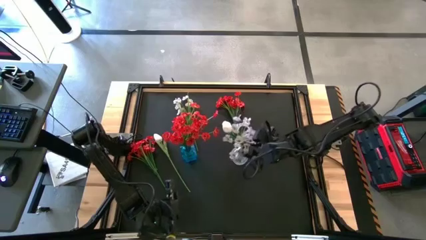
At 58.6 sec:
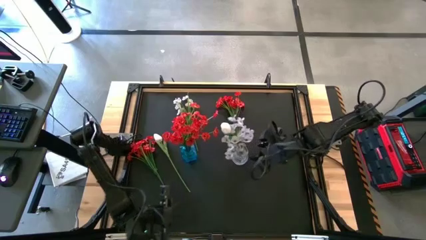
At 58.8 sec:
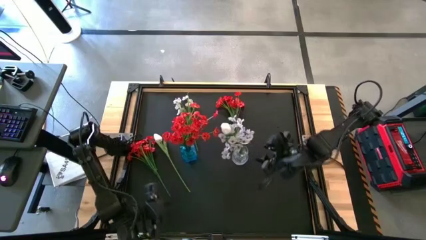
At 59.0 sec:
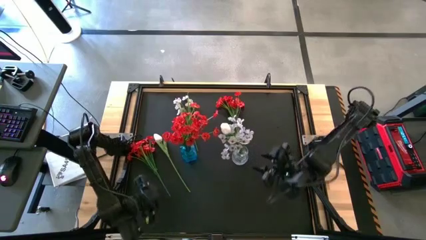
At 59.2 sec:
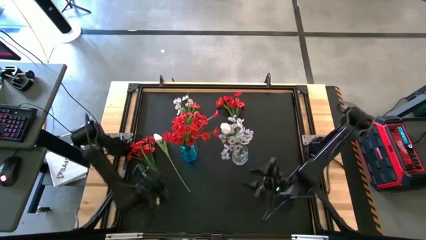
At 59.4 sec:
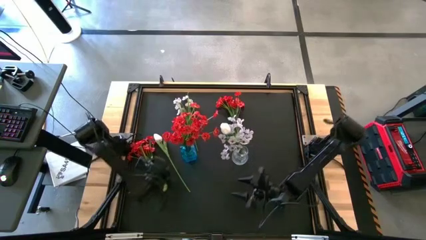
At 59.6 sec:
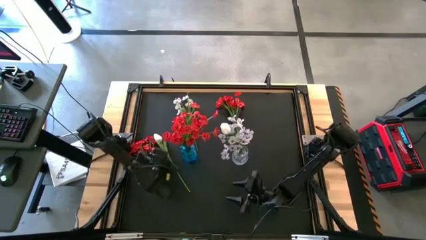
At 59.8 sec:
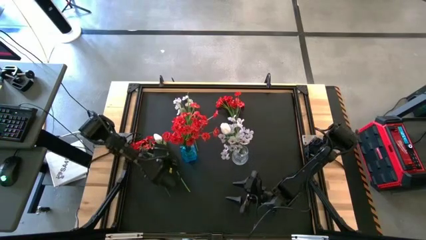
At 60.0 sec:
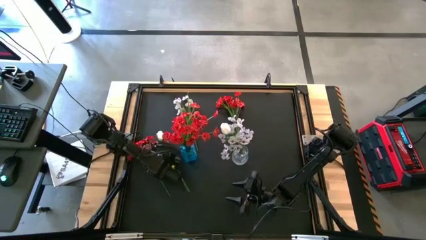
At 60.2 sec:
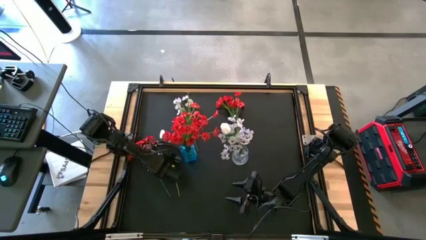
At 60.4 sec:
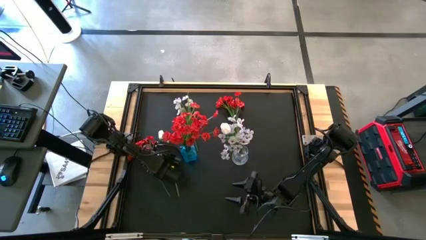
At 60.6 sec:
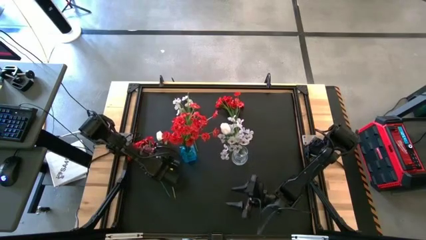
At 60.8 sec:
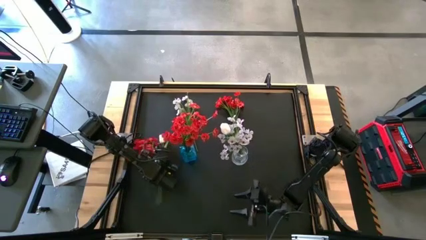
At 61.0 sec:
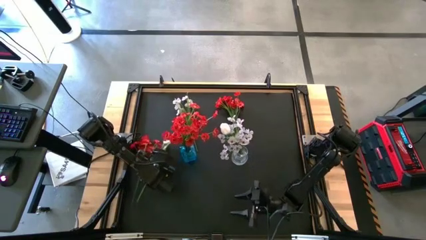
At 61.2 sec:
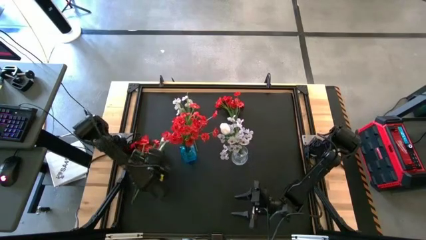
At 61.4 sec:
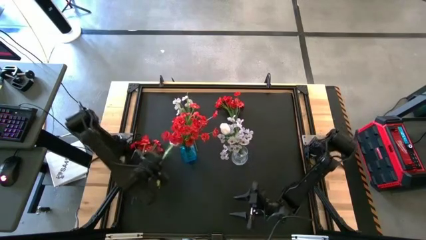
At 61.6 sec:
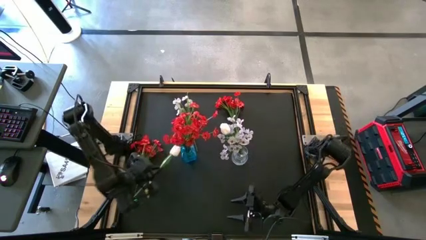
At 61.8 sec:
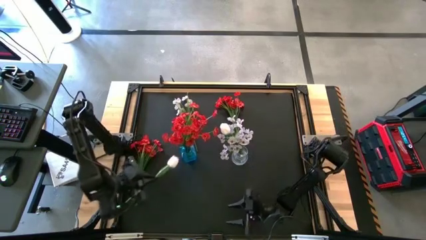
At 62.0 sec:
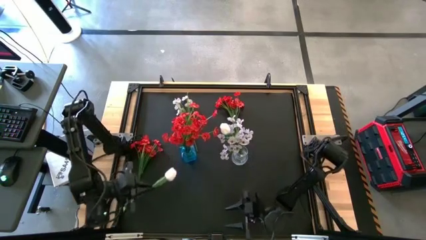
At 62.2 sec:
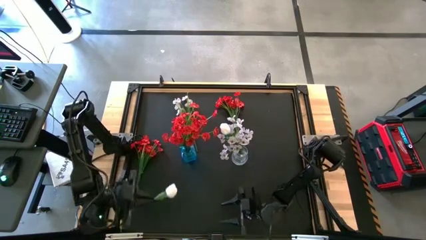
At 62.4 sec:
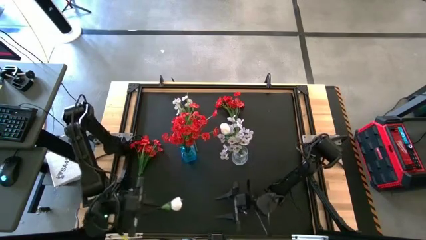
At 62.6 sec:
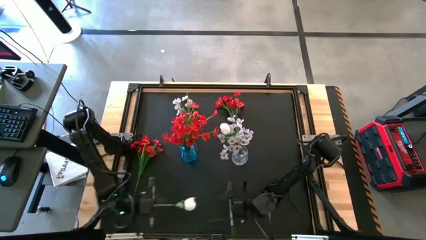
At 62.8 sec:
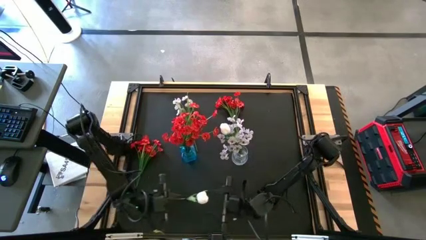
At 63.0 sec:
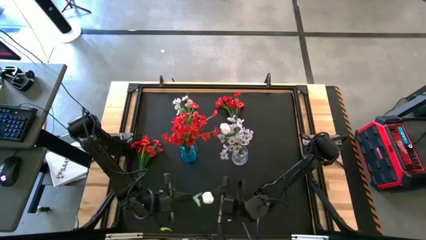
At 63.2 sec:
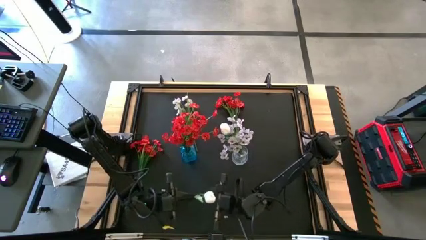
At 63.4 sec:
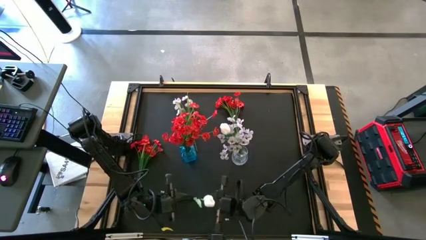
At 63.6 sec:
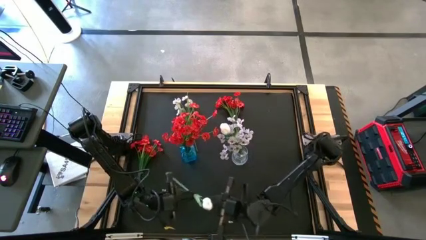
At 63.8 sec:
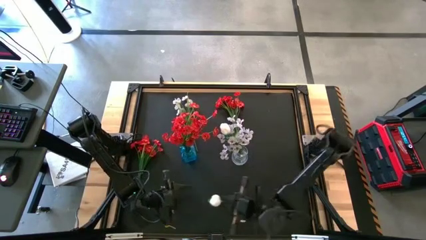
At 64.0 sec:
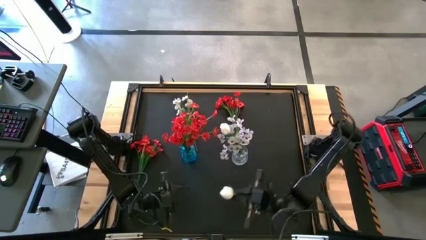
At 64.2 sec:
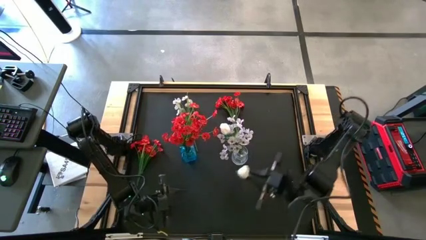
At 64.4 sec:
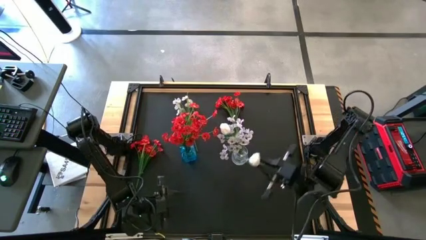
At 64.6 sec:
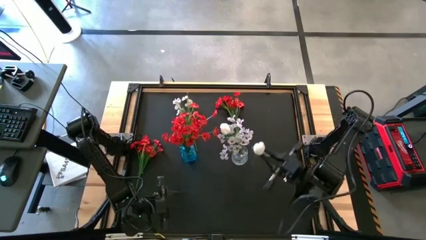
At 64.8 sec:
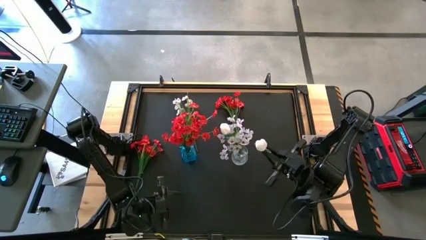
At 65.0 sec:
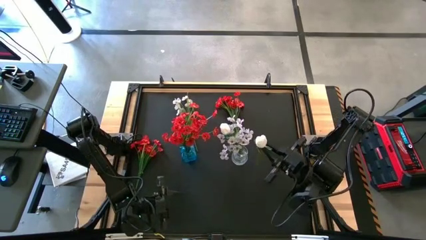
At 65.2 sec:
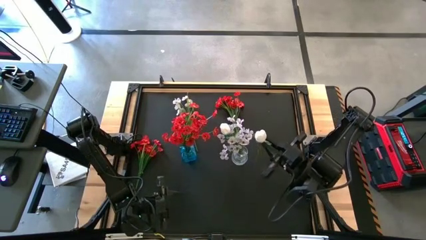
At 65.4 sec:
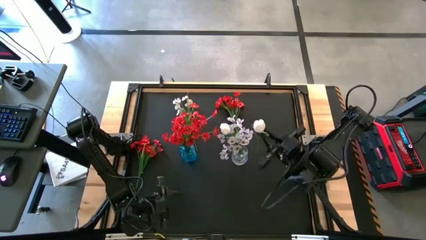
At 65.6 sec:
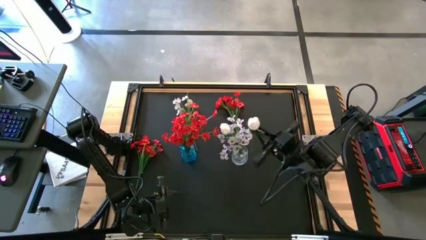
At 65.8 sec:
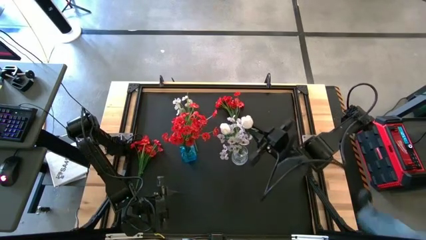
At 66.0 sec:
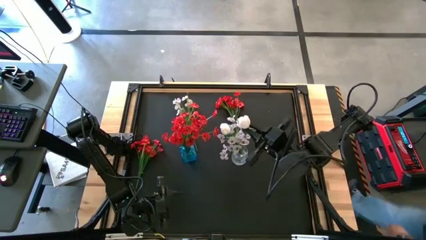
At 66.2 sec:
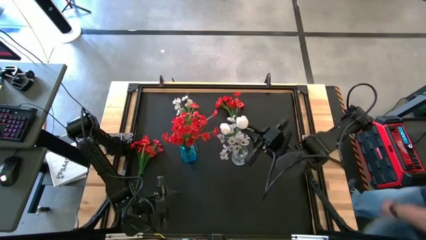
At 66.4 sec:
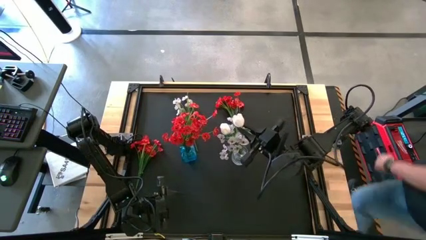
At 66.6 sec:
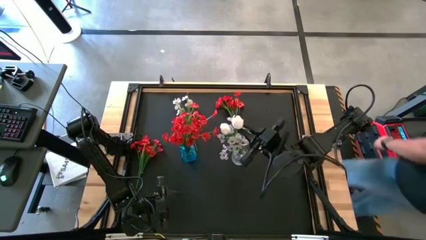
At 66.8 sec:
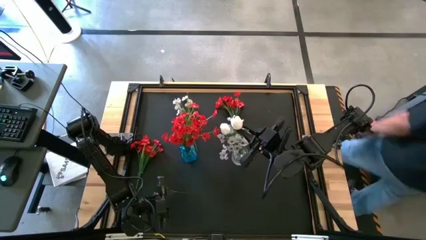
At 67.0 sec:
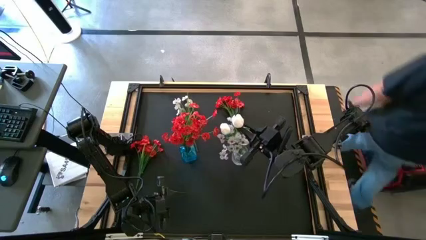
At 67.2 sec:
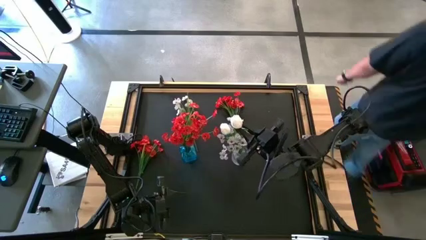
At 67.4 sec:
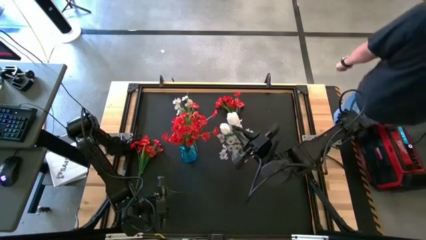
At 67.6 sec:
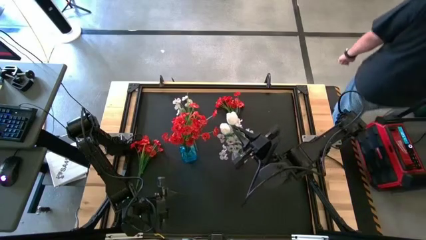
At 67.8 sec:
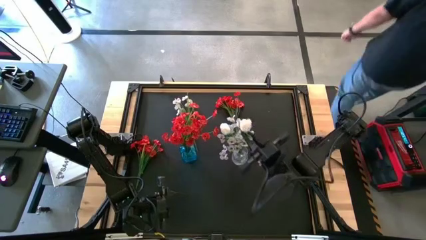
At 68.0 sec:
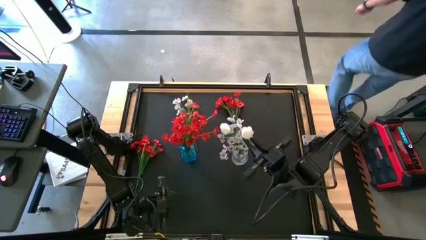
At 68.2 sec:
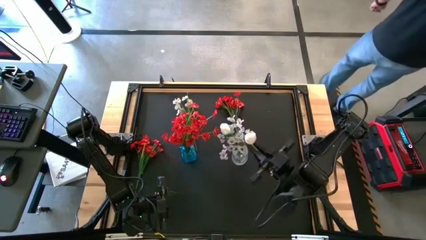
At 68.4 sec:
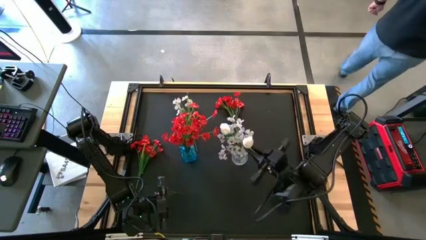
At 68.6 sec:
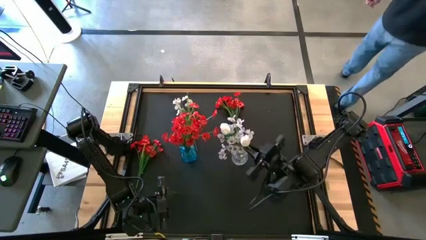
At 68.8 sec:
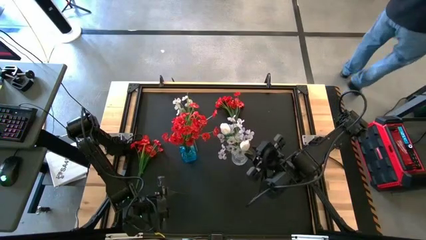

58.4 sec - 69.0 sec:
Task: Sort flowers into vase by color
Put the white flower into the transparent vase

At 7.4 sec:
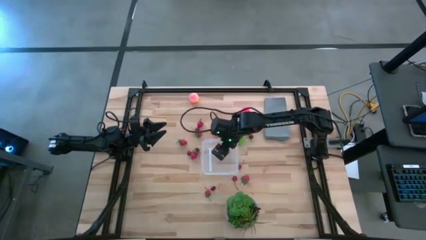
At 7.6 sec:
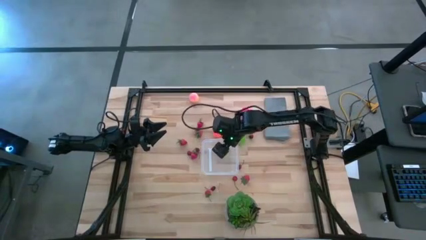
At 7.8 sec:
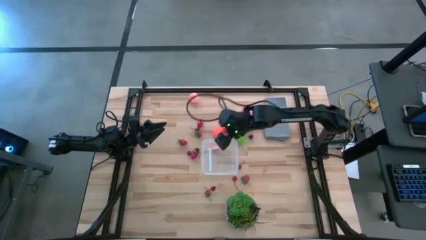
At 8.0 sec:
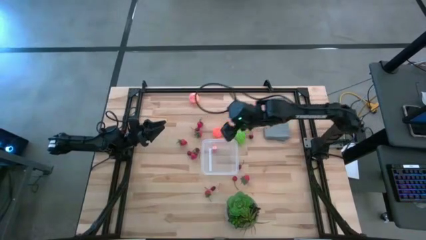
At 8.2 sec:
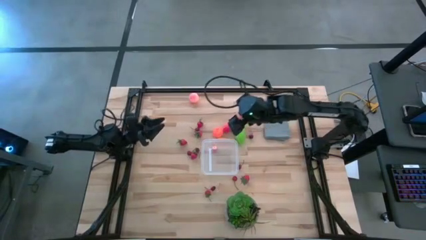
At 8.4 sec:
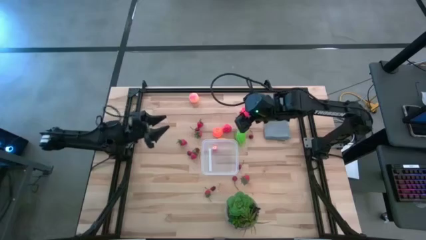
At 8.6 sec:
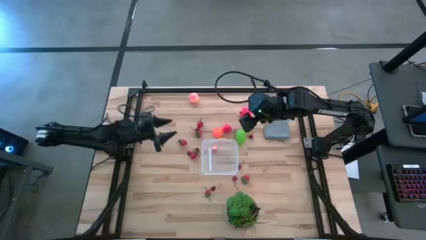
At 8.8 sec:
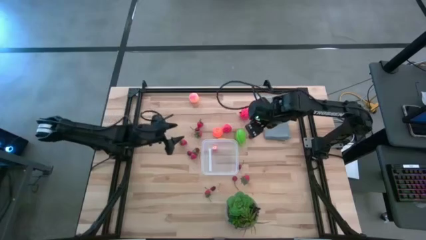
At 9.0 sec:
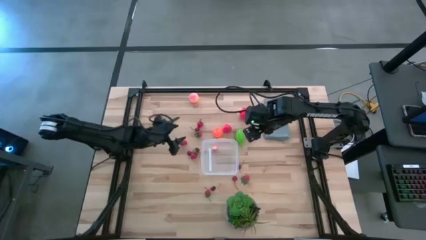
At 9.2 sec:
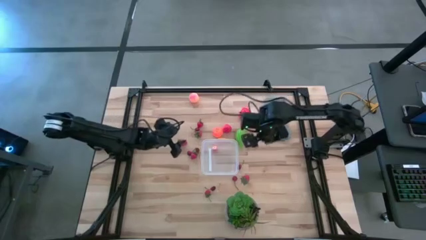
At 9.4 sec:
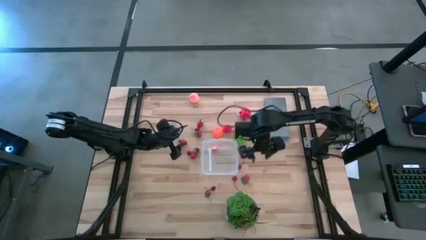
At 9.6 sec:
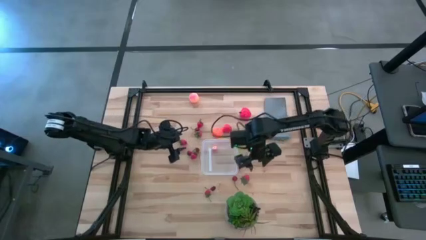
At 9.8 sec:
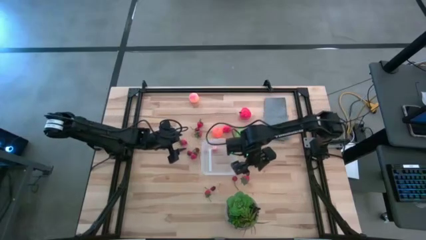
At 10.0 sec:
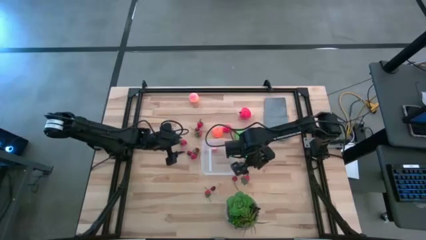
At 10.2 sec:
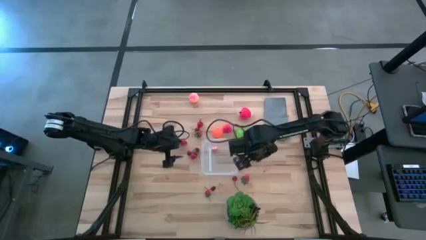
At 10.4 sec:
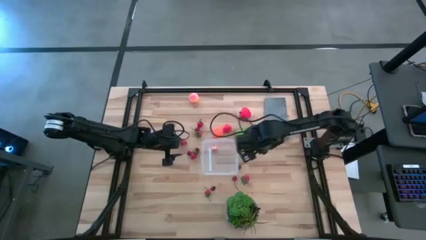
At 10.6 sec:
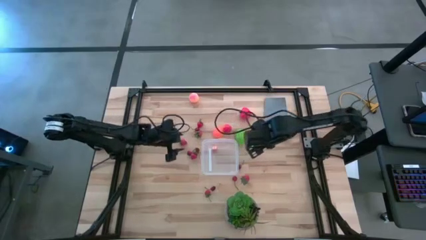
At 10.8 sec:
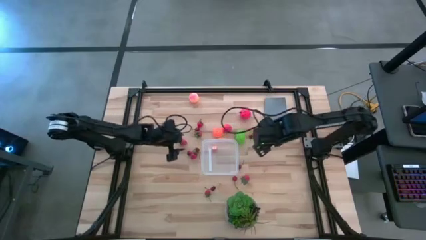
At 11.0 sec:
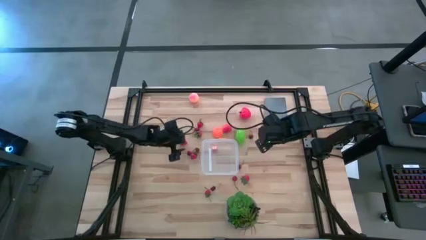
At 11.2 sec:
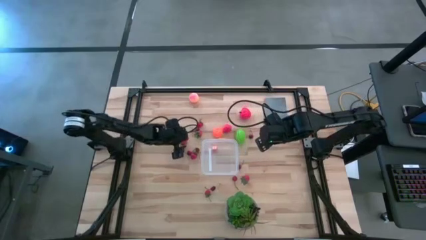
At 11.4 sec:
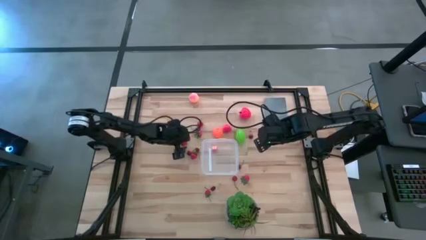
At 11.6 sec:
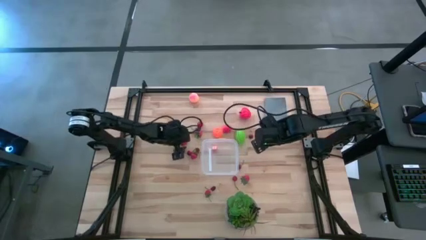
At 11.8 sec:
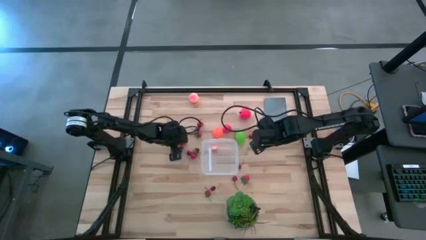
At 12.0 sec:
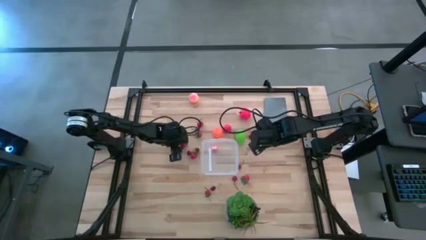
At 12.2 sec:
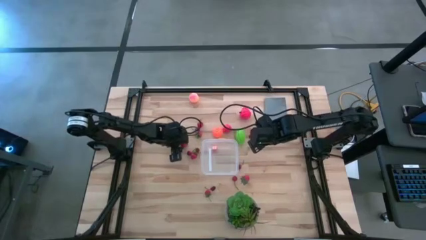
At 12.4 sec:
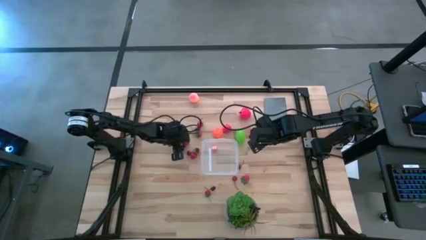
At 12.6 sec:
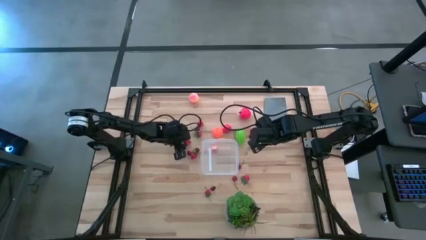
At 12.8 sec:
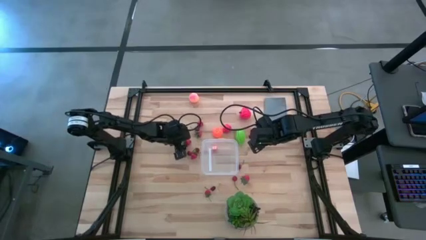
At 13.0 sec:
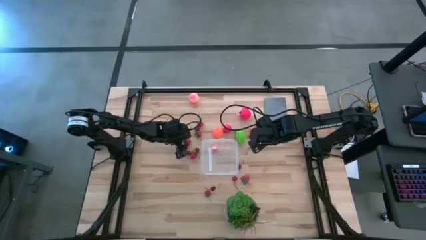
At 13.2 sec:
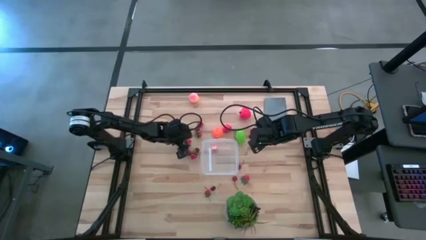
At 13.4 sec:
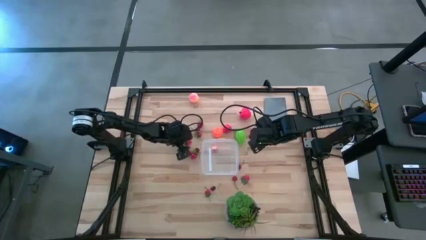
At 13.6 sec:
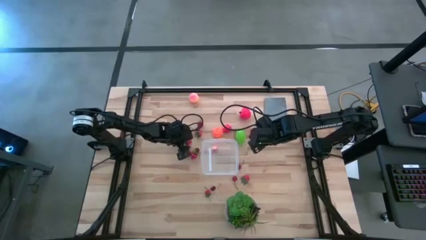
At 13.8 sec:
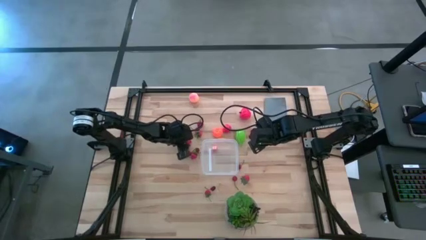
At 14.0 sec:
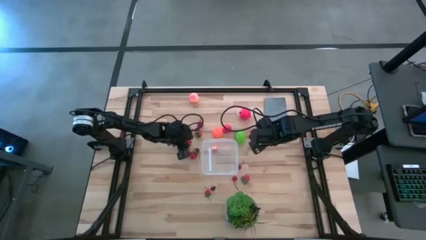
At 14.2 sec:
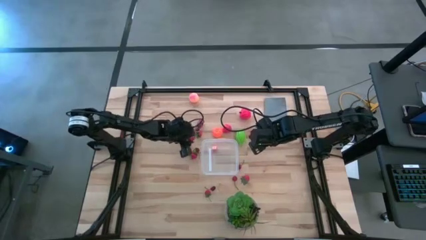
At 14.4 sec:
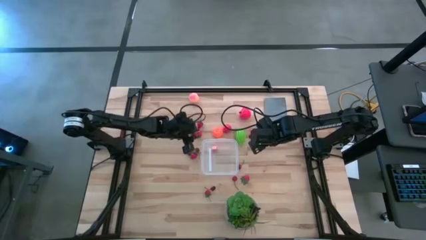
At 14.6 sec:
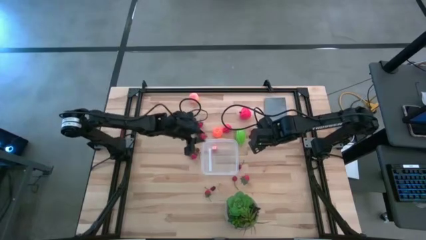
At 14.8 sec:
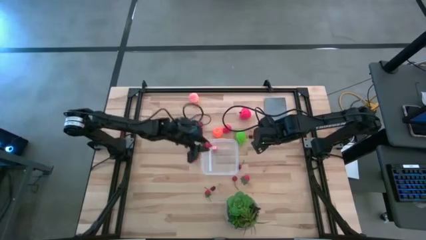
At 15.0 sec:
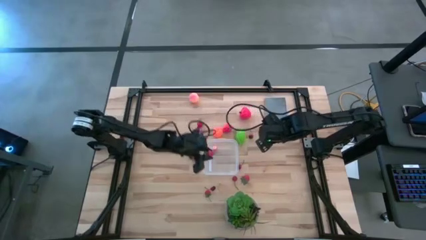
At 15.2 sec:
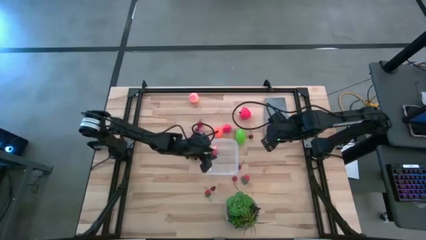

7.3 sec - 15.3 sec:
Task: Pick and placing Produce into tupperware
Put the red strawberry into the transparent container
